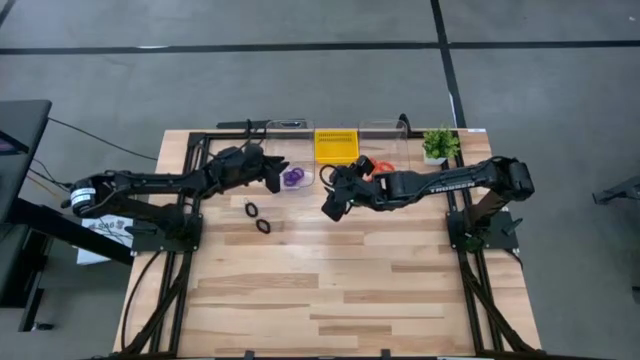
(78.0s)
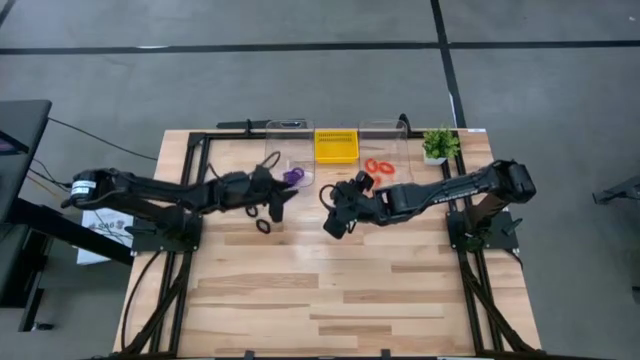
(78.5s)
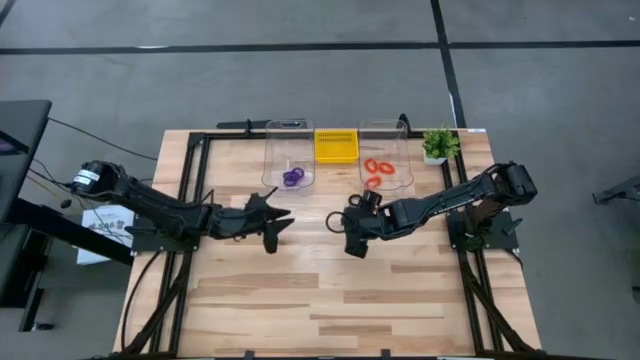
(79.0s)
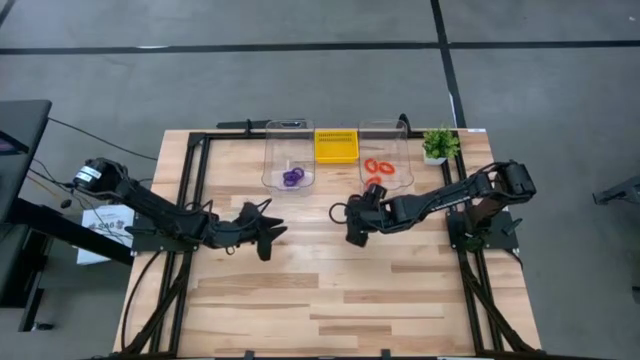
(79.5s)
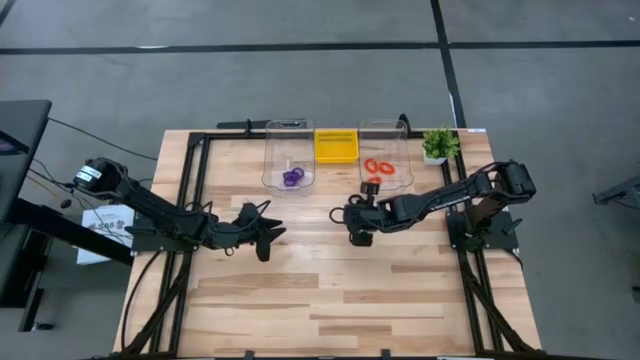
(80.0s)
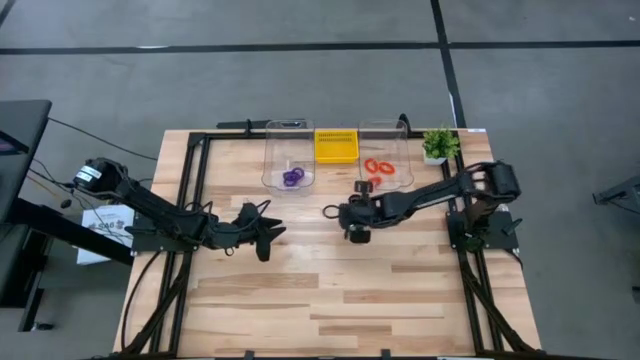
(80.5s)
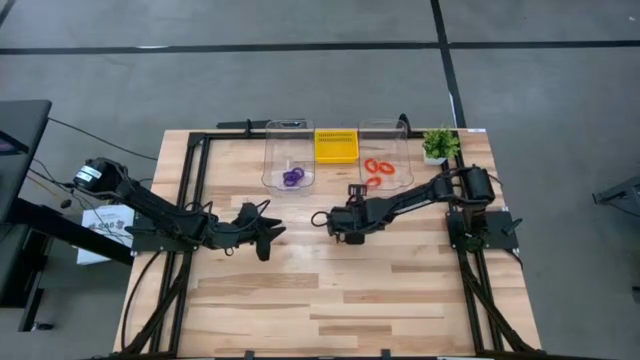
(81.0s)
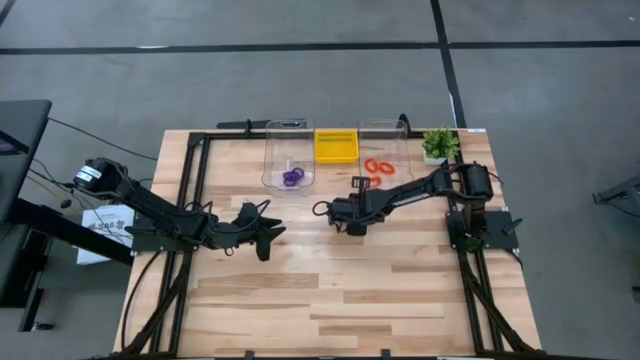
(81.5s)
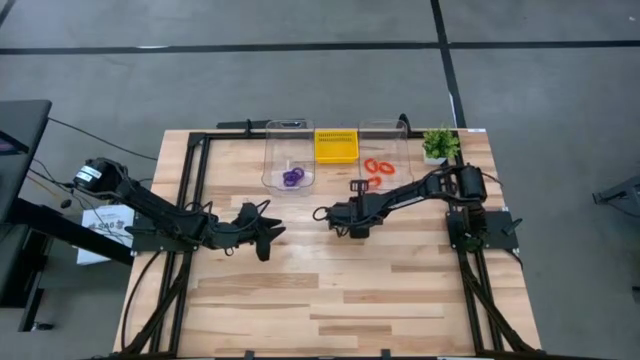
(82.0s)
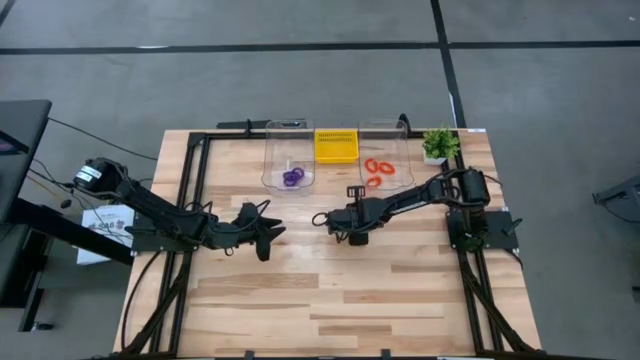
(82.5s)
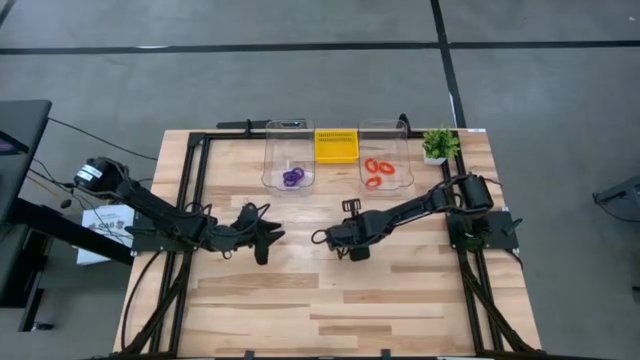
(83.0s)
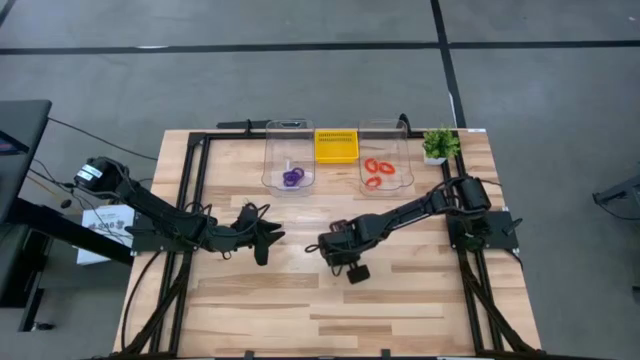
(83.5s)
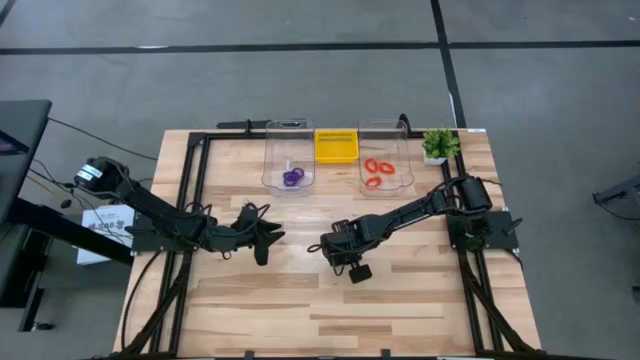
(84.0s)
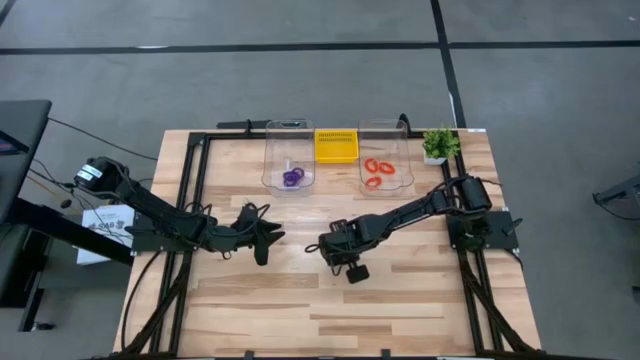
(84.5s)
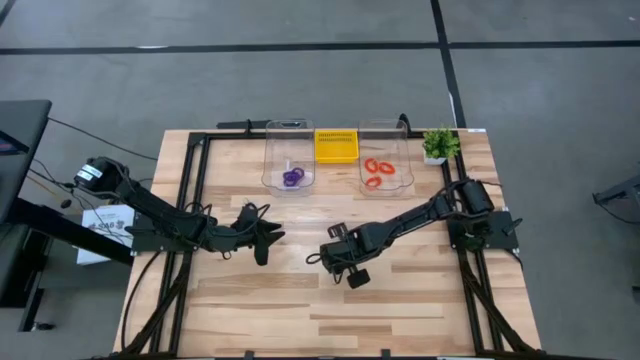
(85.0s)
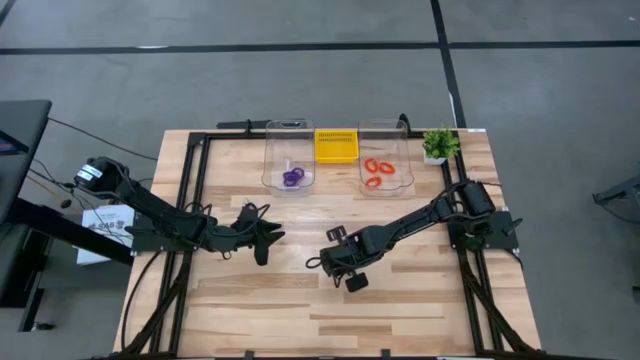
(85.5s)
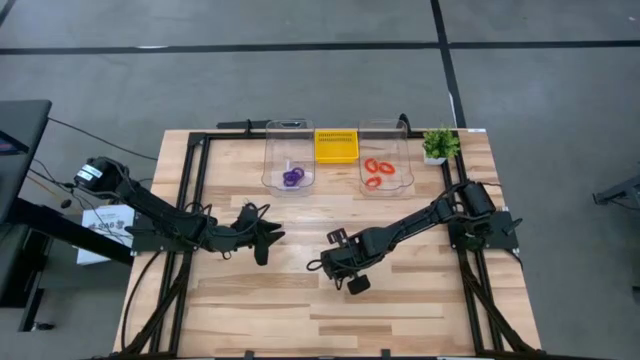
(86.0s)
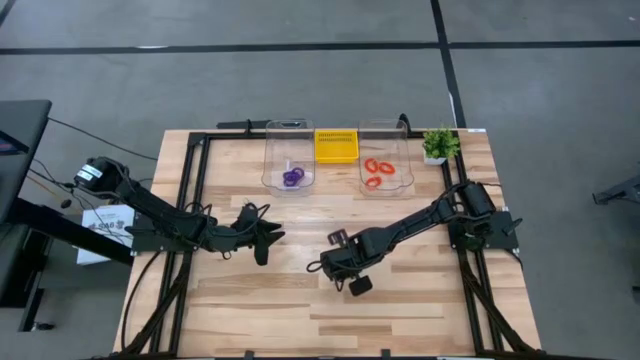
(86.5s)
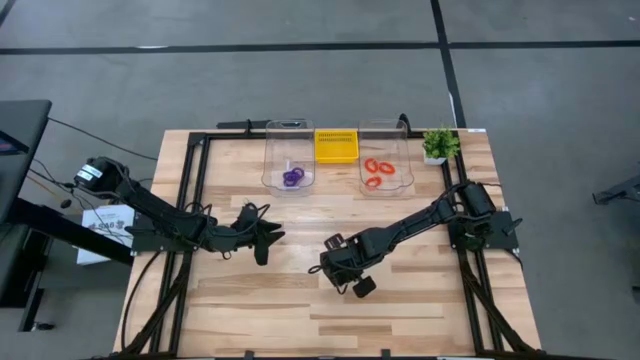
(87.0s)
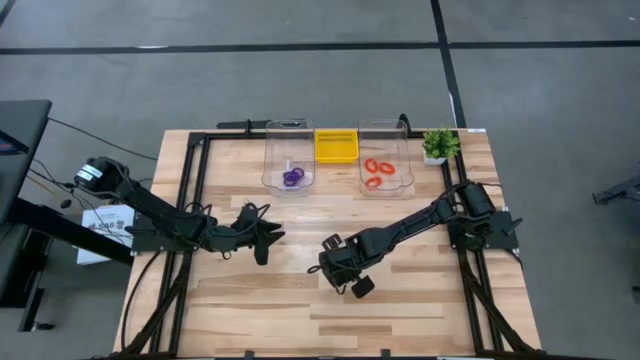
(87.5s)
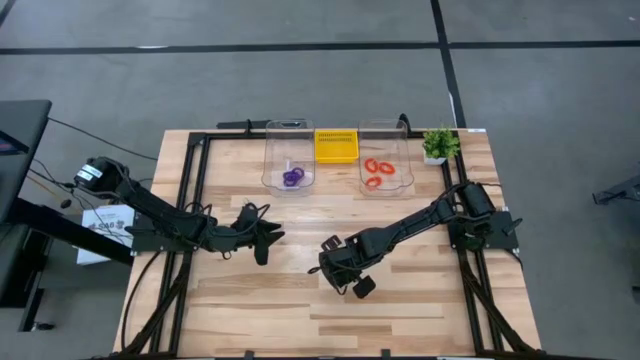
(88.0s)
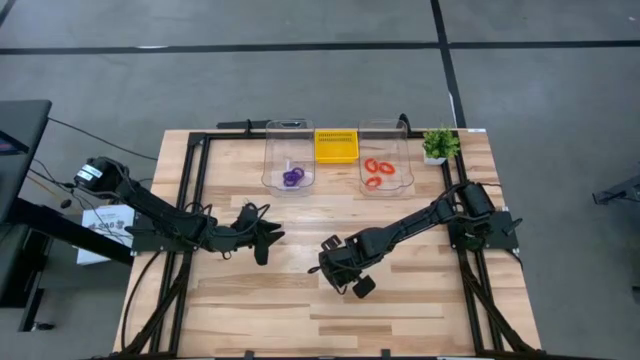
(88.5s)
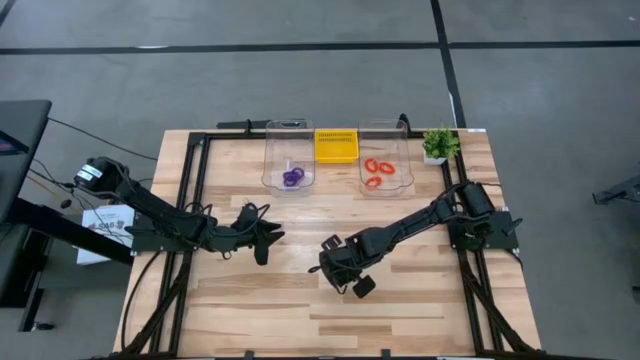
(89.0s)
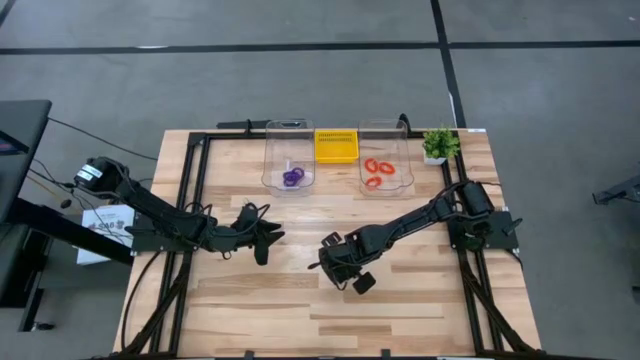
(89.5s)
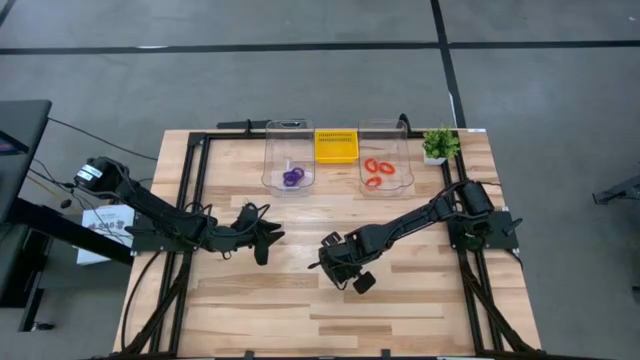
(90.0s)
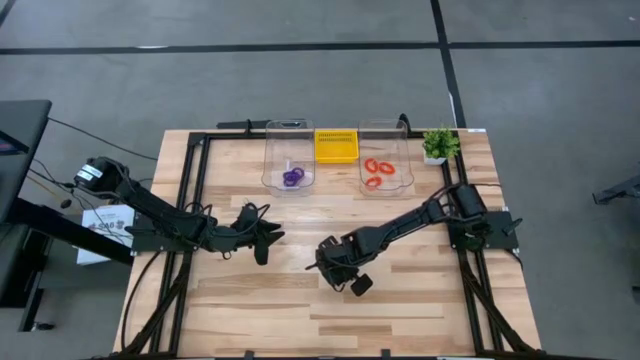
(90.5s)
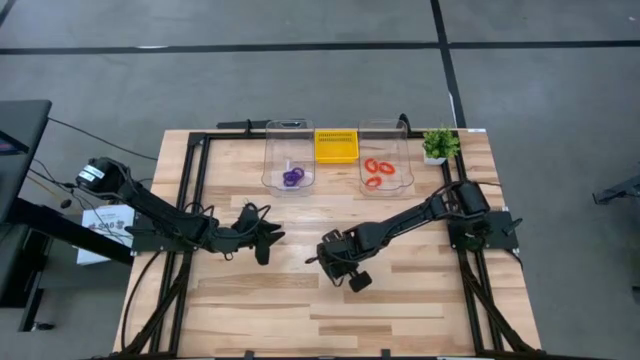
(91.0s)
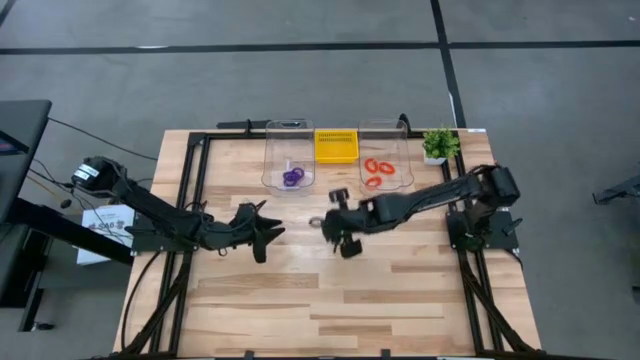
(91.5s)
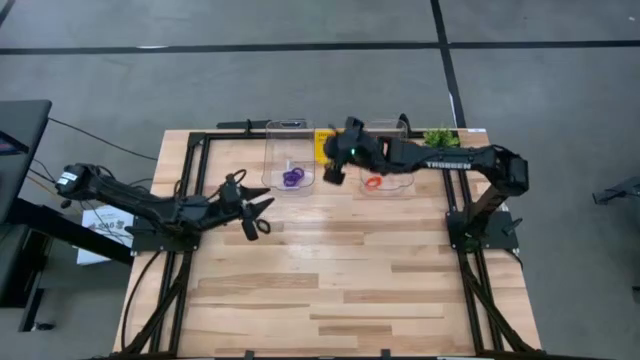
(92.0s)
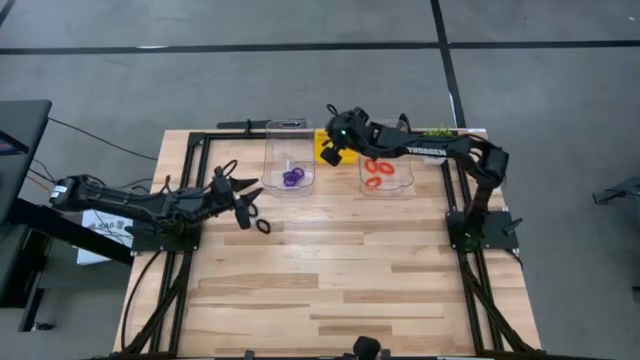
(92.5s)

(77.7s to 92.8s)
Task: Sort spring keychains
Put the top right black spring keychain into the yellow bin

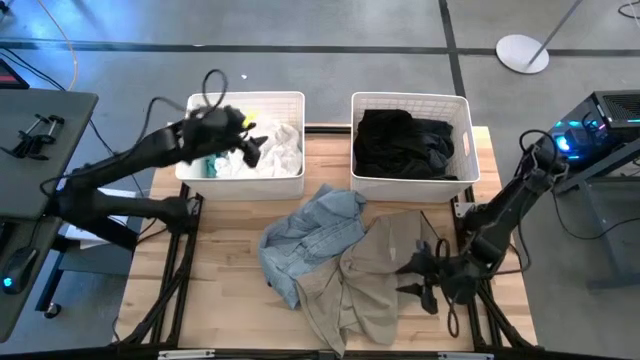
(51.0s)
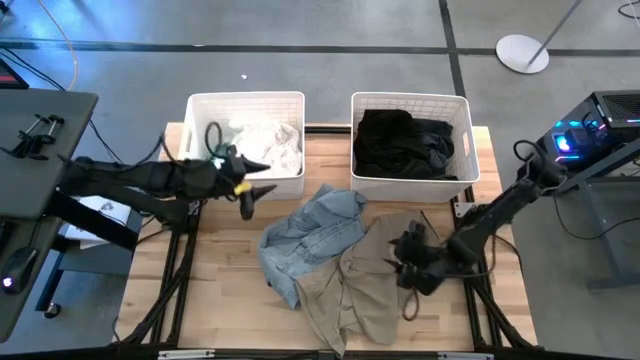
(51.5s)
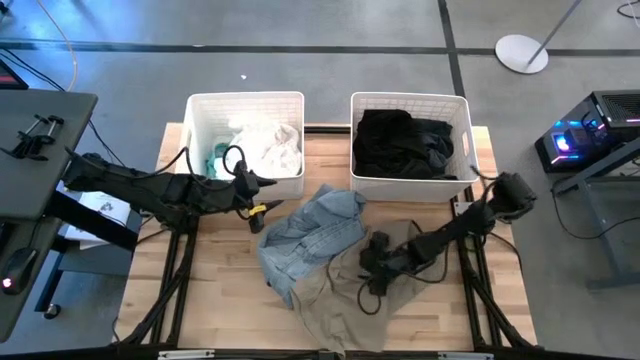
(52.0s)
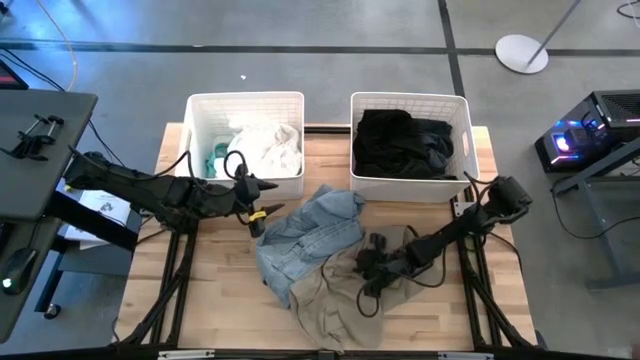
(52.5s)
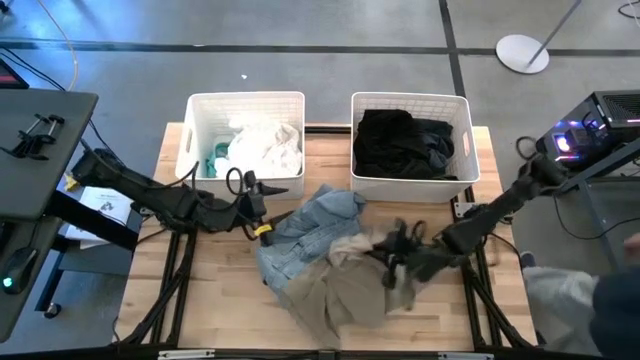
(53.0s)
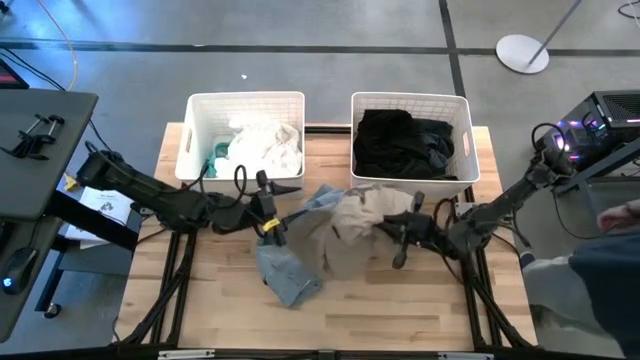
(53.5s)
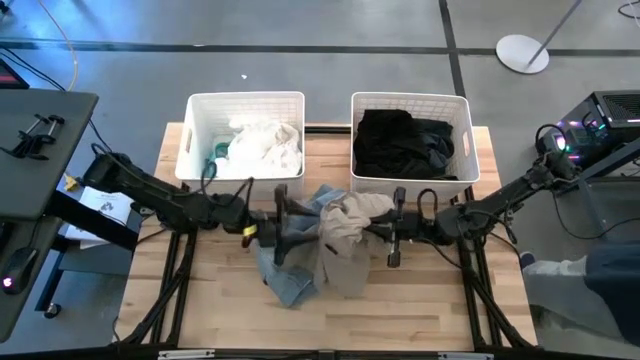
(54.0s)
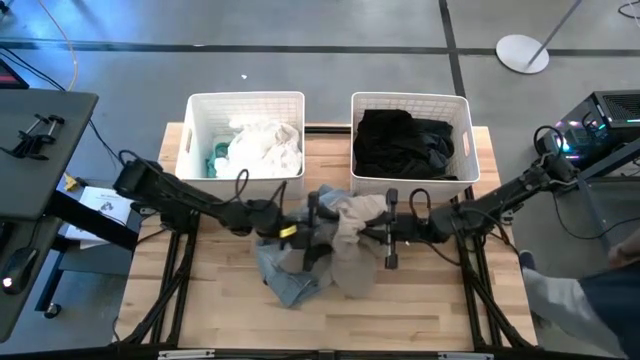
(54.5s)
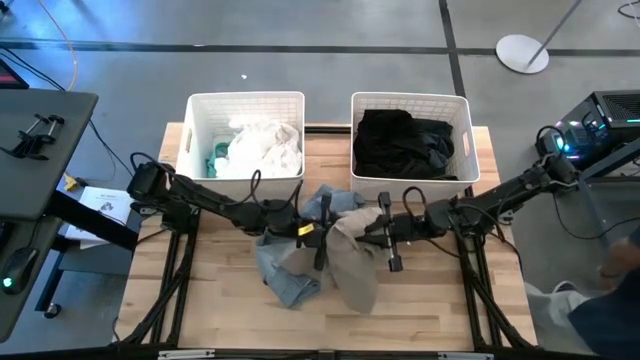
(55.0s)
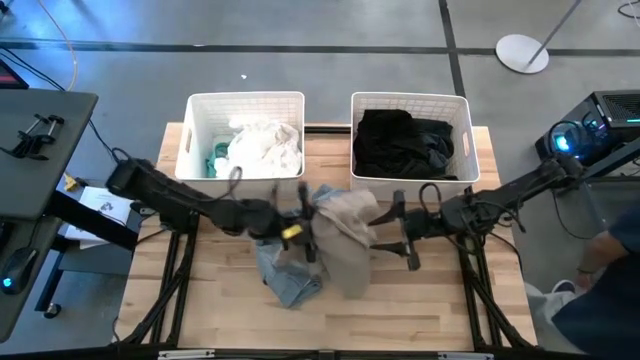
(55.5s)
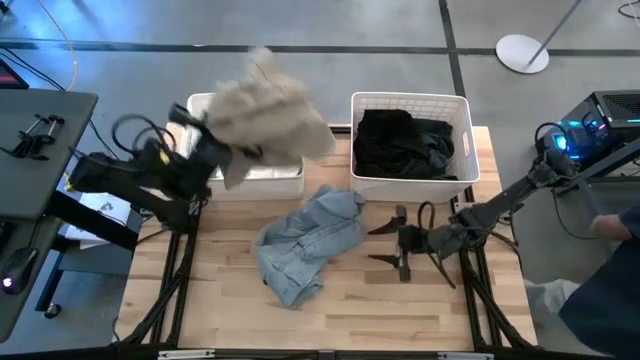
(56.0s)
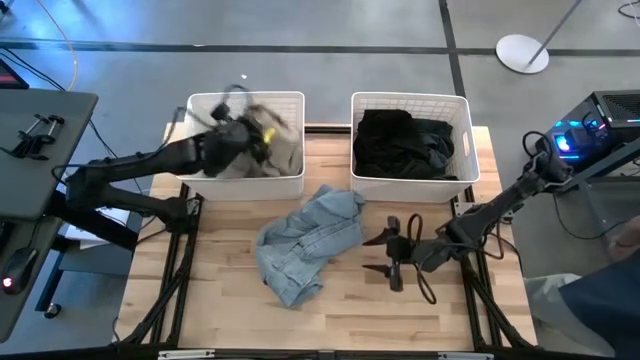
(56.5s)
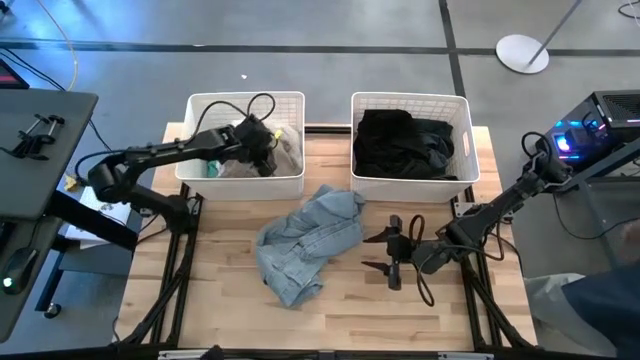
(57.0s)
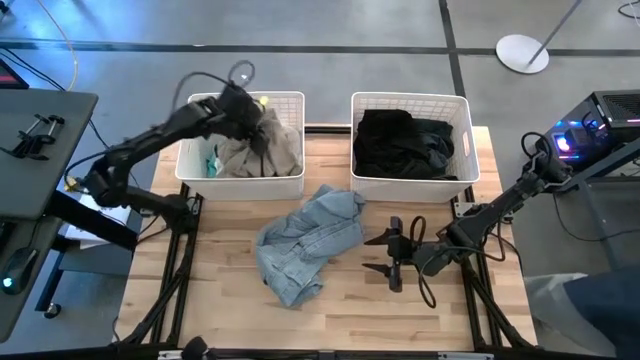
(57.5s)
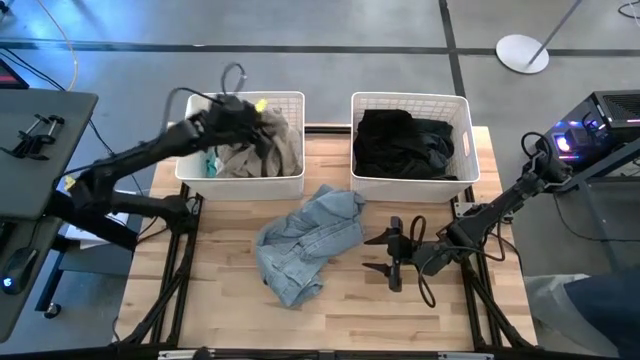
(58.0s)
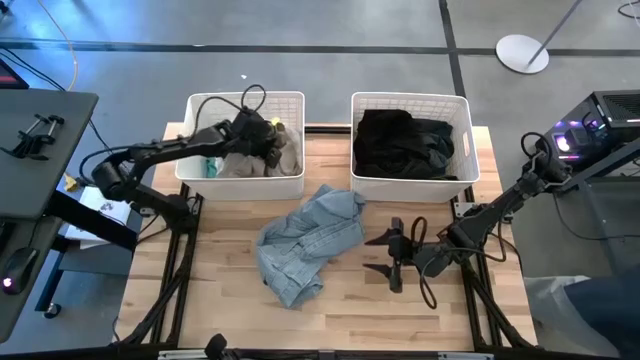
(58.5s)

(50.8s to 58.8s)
Task: Sort clothes
Put the light brown shorts into the left white laundry bin
